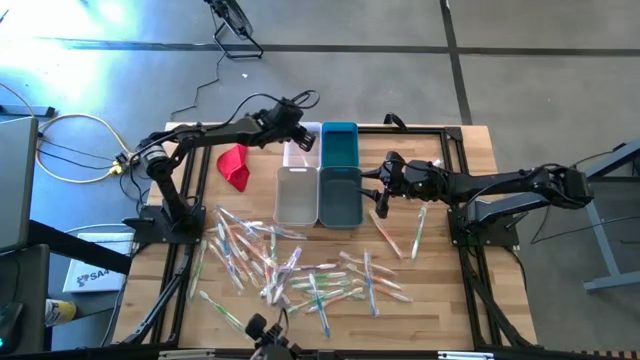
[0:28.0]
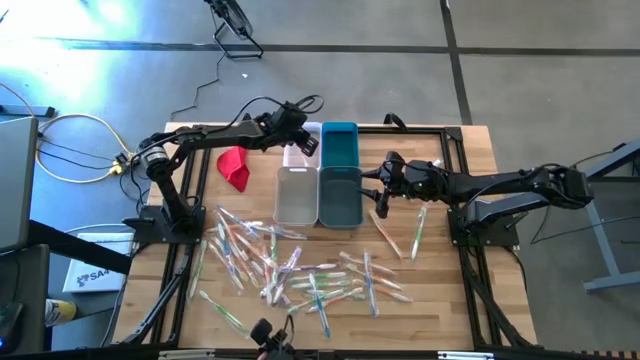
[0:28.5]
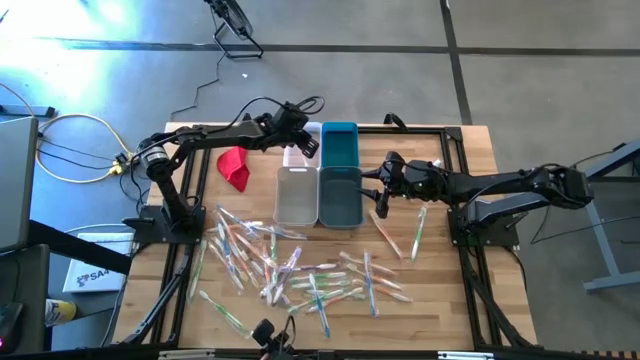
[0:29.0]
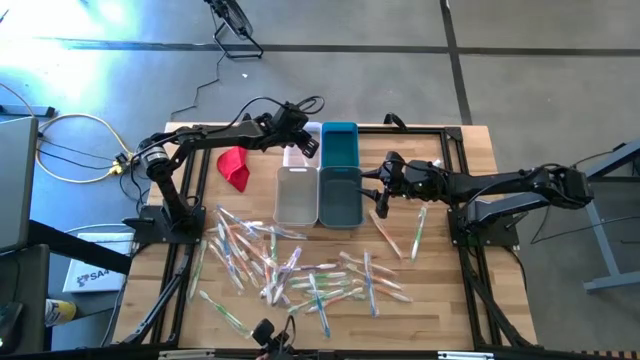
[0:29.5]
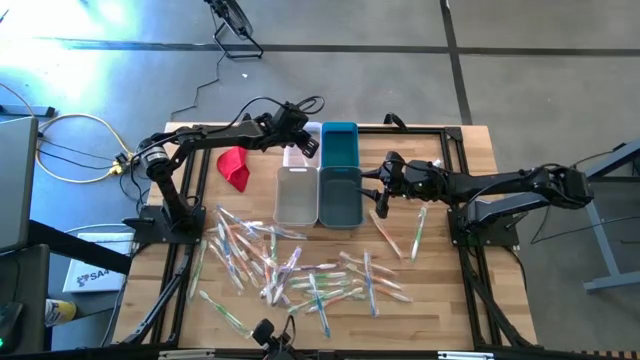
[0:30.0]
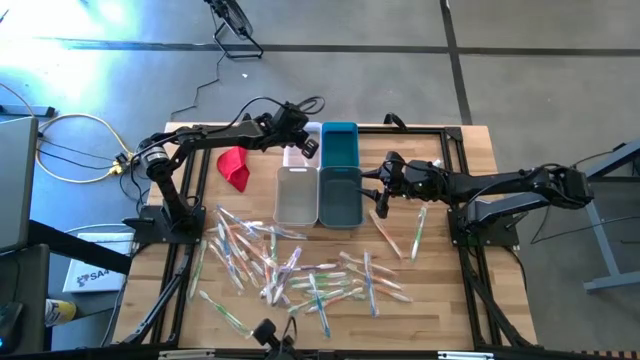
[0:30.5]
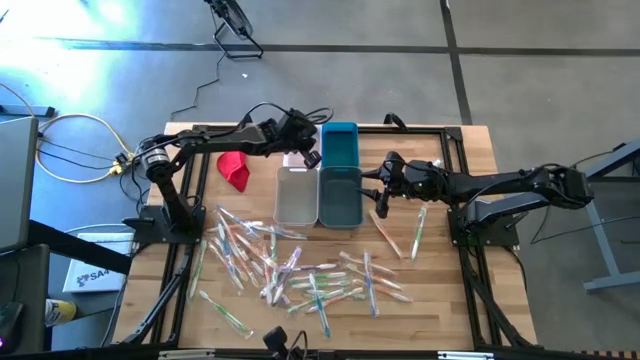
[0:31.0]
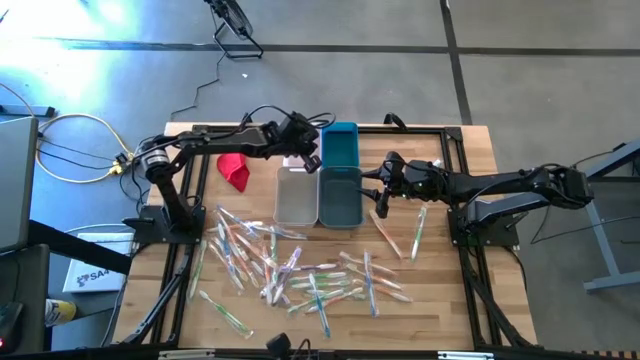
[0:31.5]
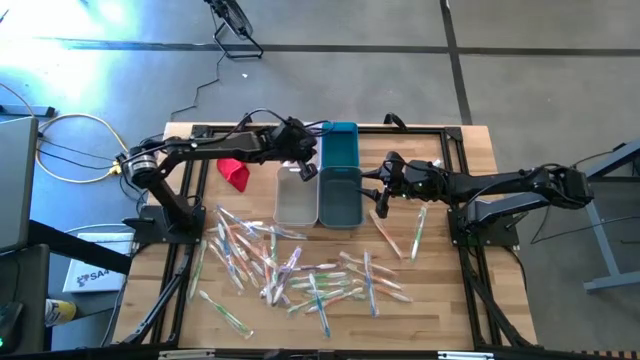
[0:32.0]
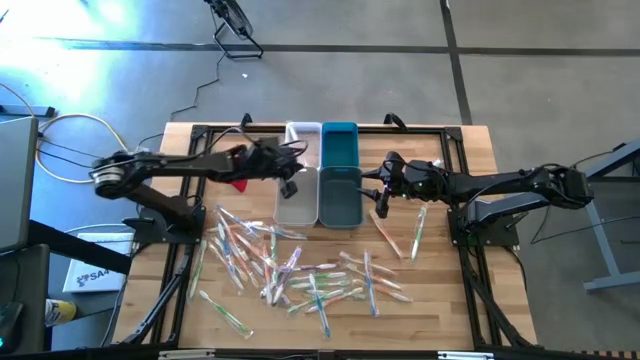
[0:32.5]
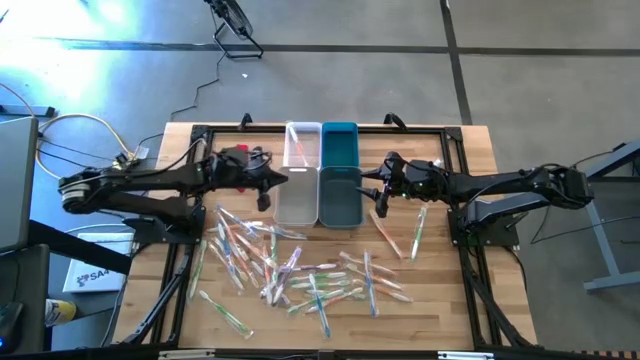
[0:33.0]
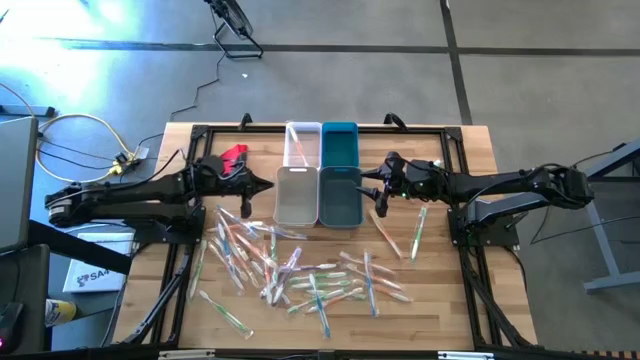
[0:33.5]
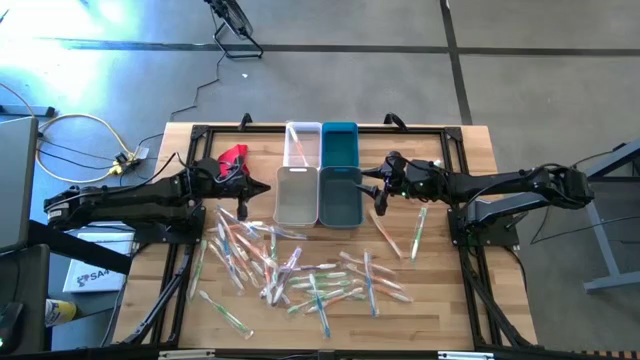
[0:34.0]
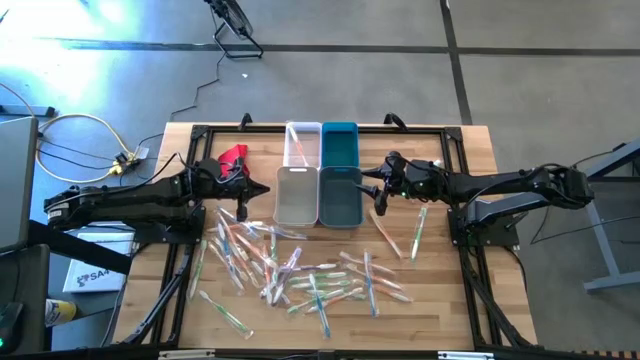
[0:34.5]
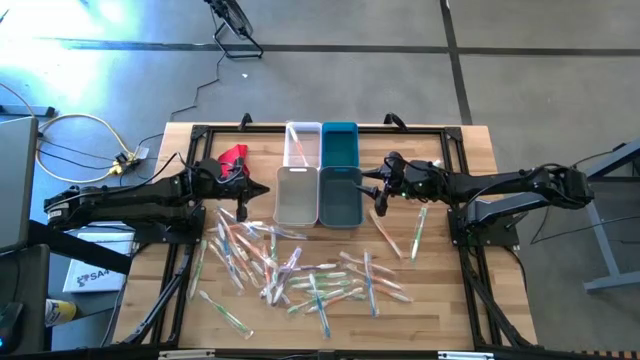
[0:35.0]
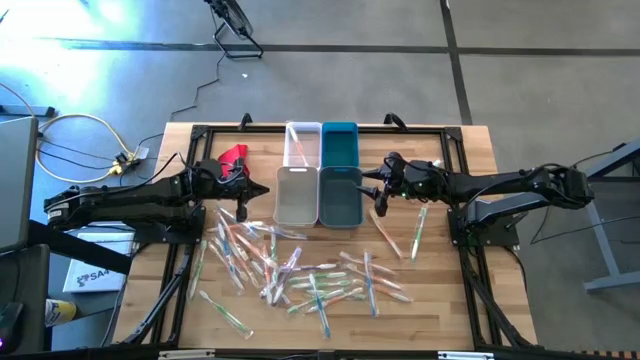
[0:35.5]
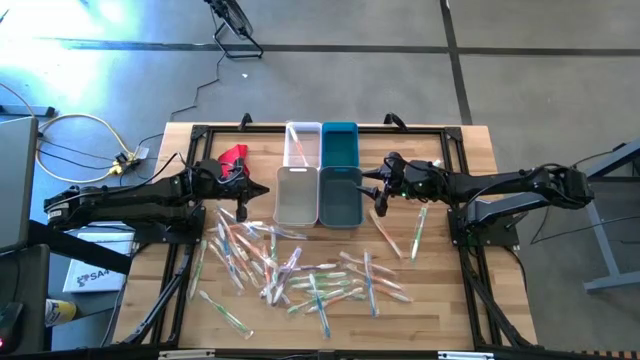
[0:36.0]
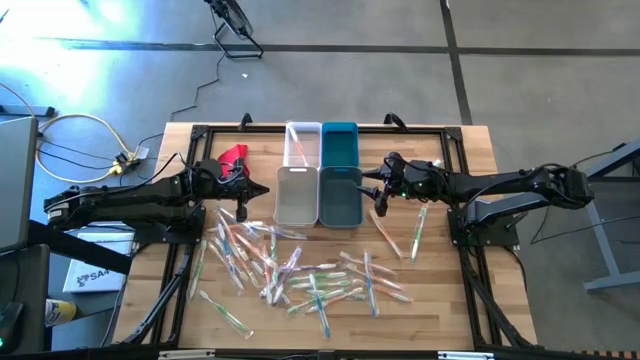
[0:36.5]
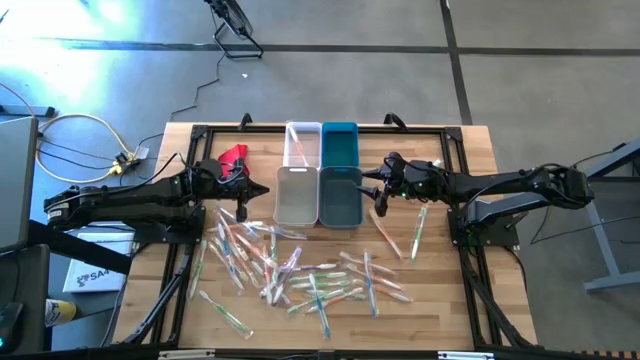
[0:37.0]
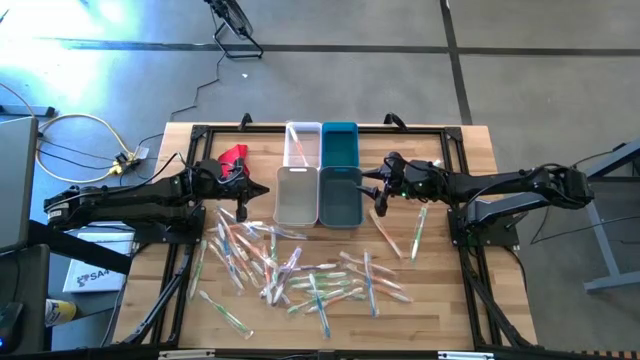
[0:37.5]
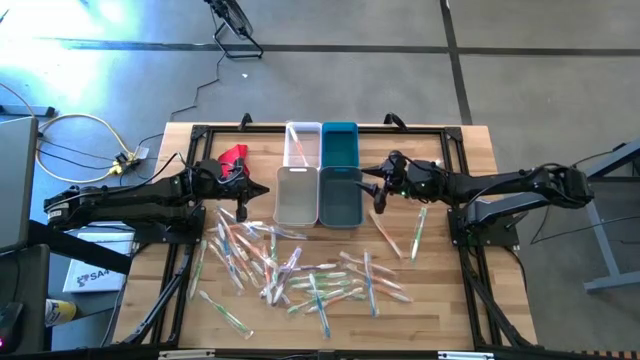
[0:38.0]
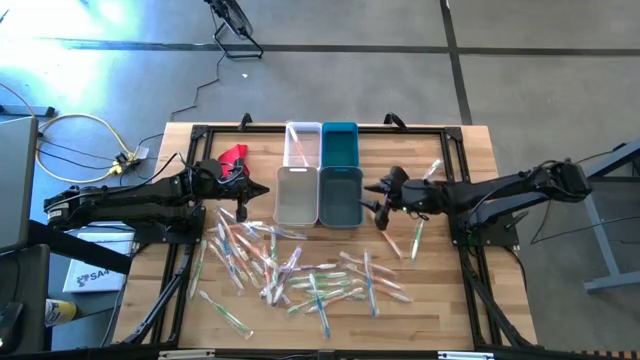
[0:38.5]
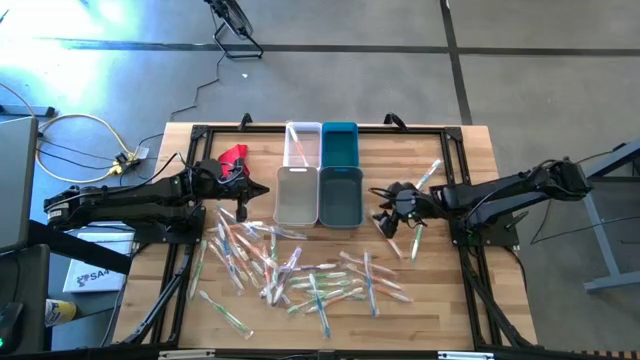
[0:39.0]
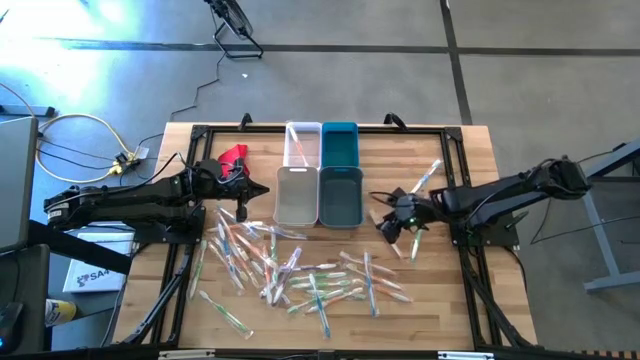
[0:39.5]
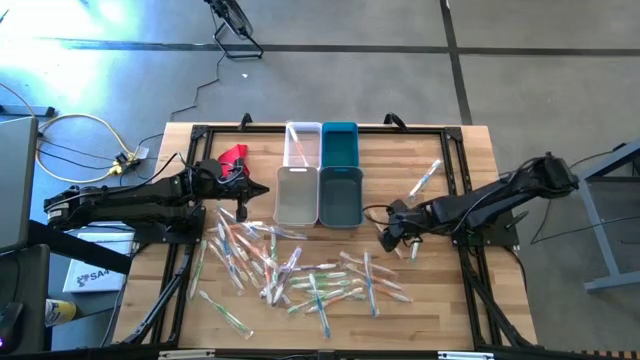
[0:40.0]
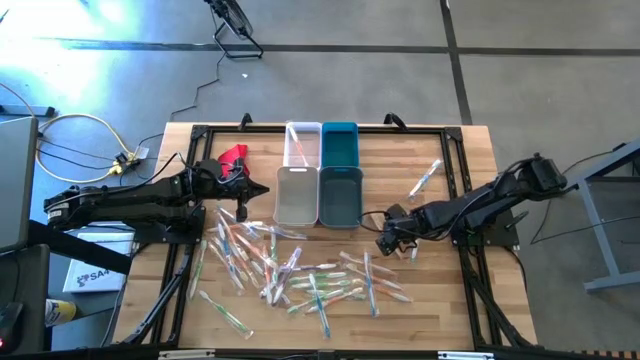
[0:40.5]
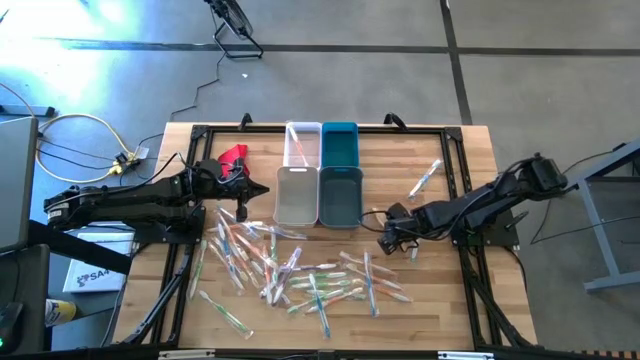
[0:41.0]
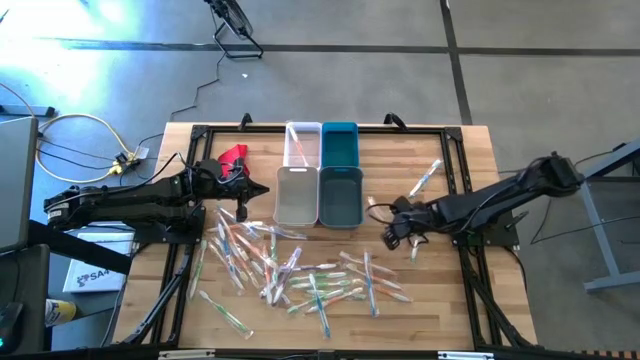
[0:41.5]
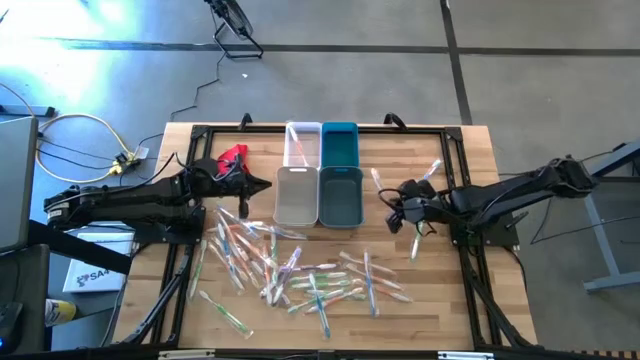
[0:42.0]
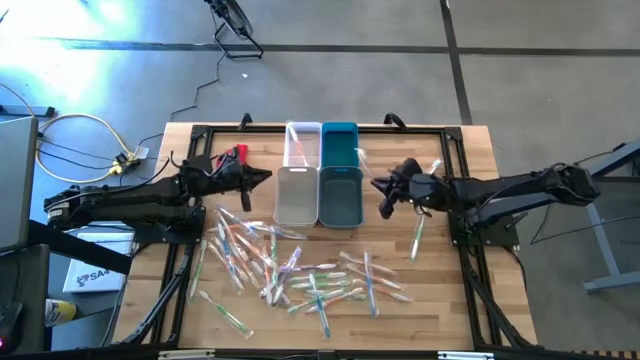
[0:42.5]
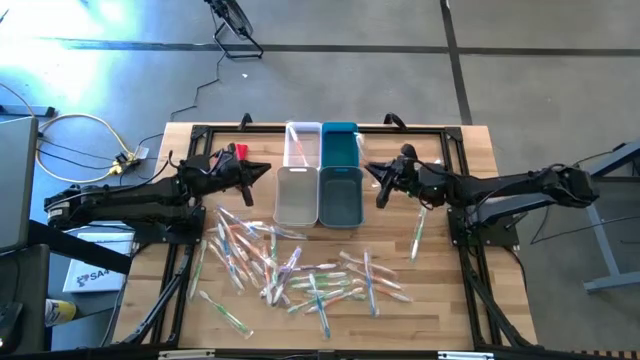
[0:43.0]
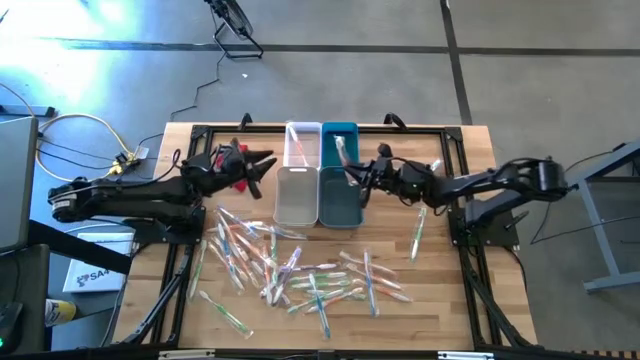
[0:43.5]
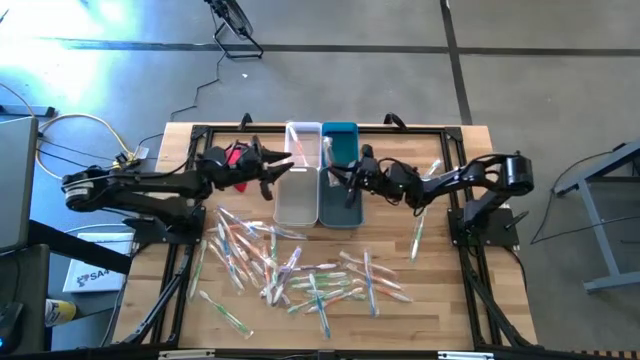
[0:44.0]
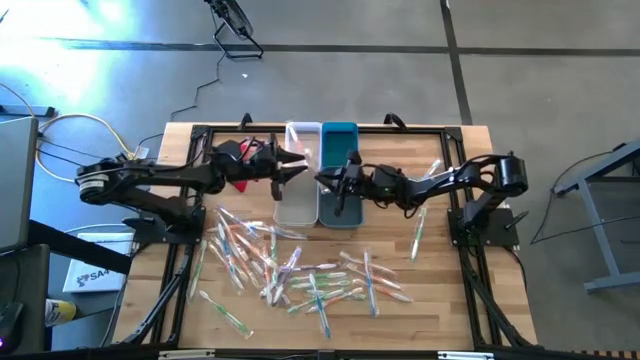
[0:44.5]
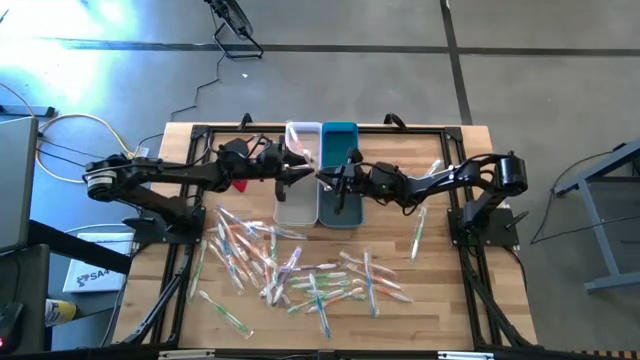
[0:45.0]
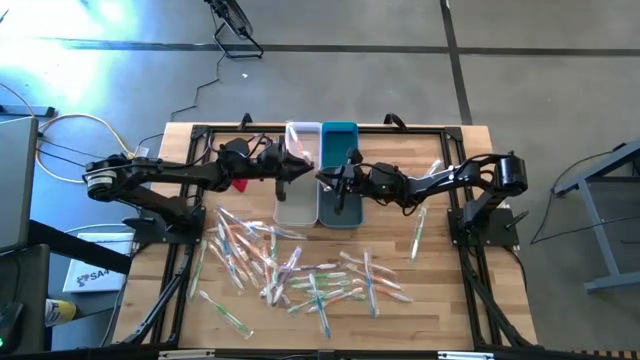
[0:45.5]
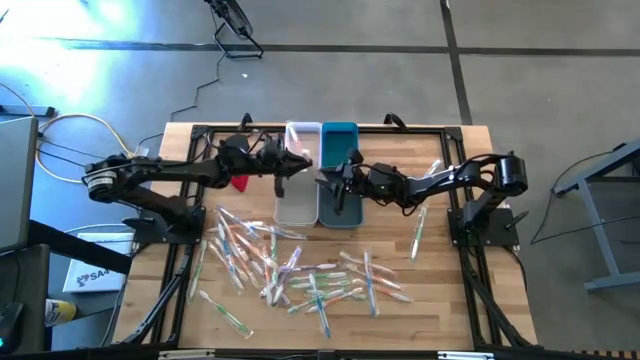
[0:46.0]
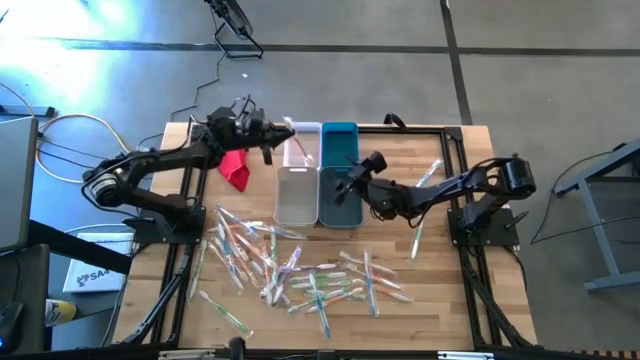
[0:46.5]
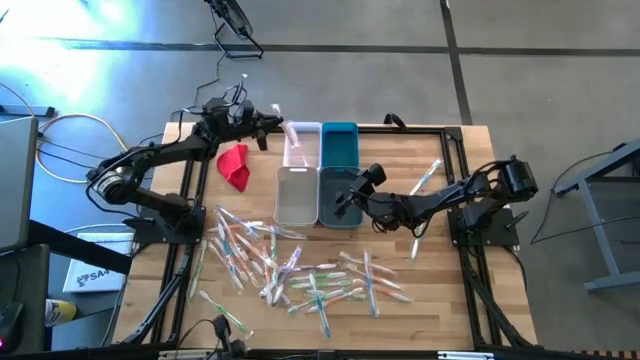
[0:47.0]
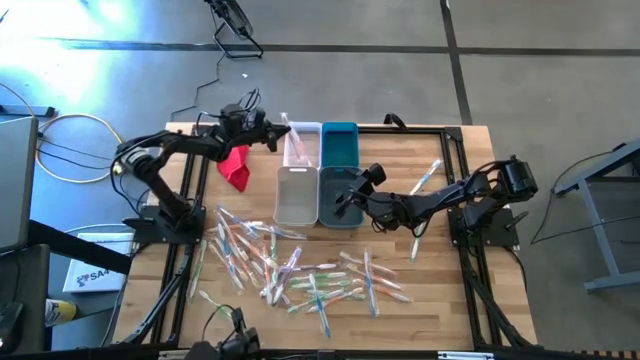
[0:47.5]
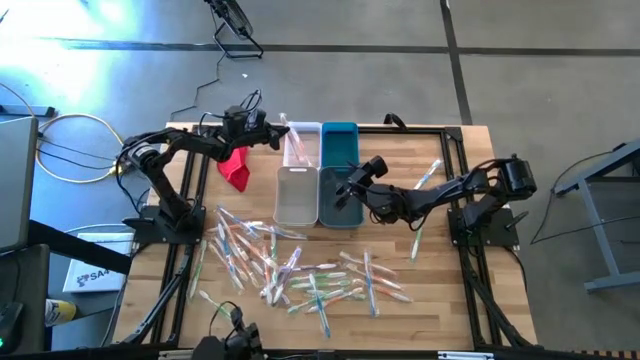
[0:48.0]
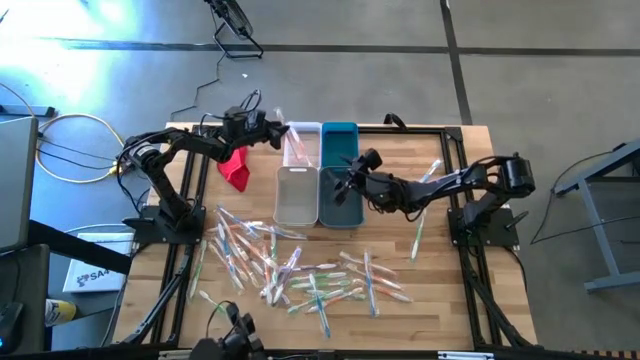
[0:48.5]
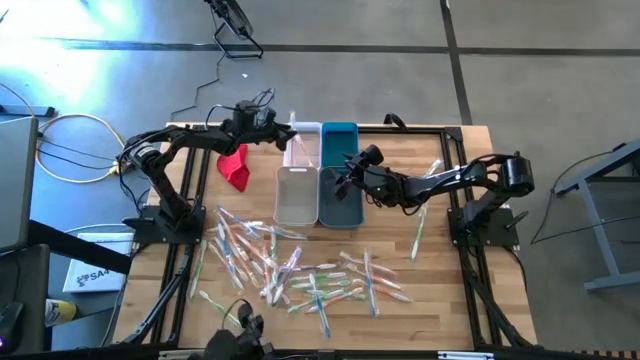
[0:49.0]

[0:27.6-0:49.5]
Task: Pick & Place Toothbrushes
Put the orange toothbrush into the transparent bin
